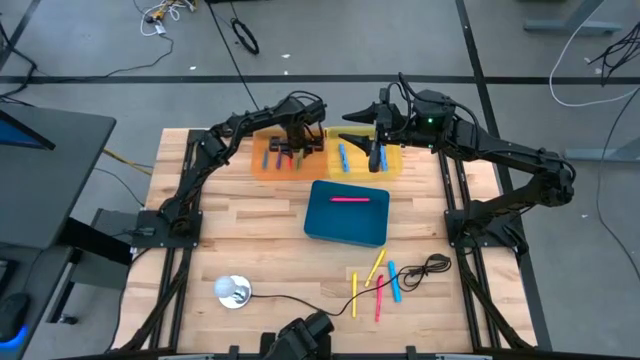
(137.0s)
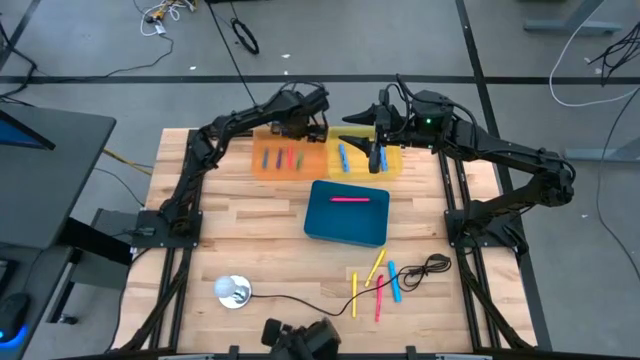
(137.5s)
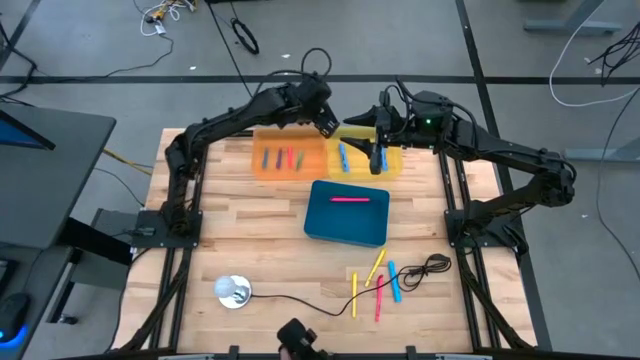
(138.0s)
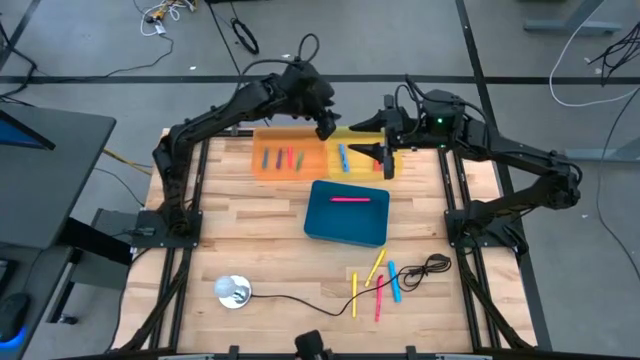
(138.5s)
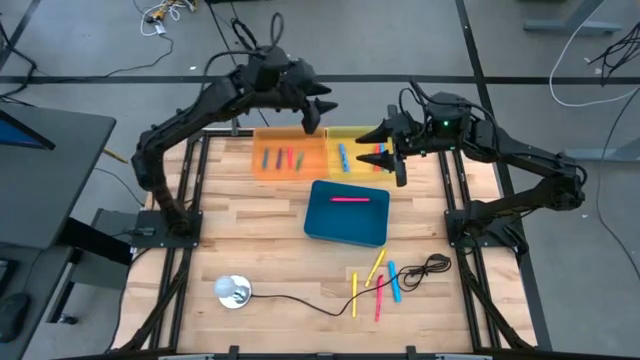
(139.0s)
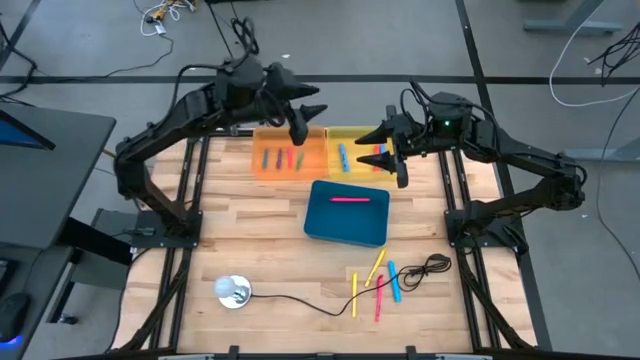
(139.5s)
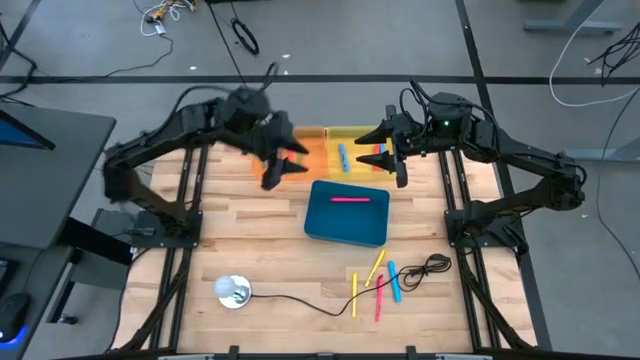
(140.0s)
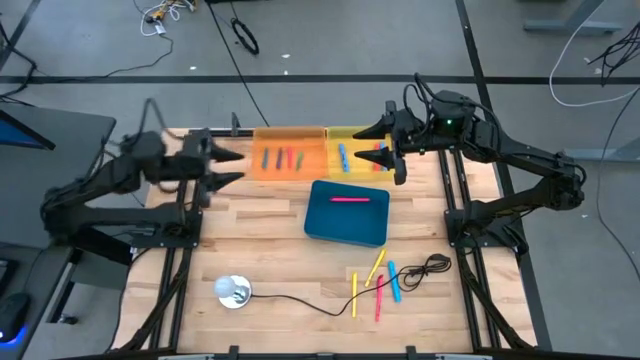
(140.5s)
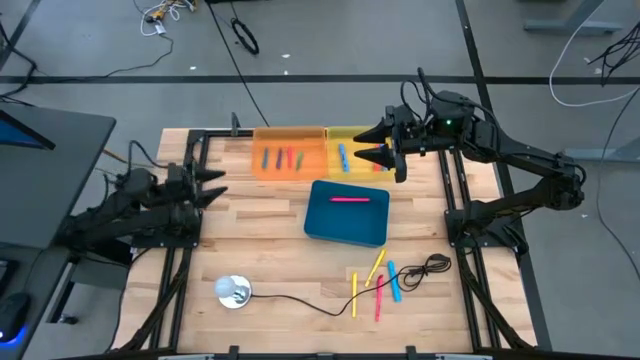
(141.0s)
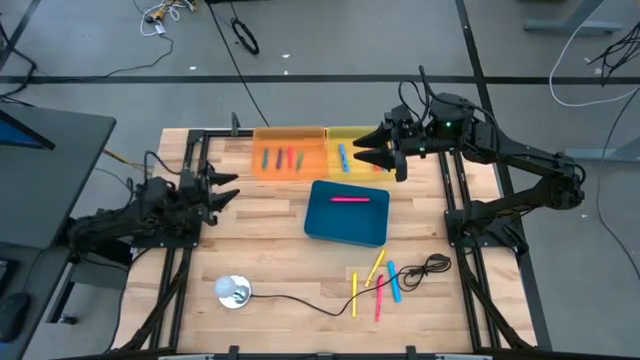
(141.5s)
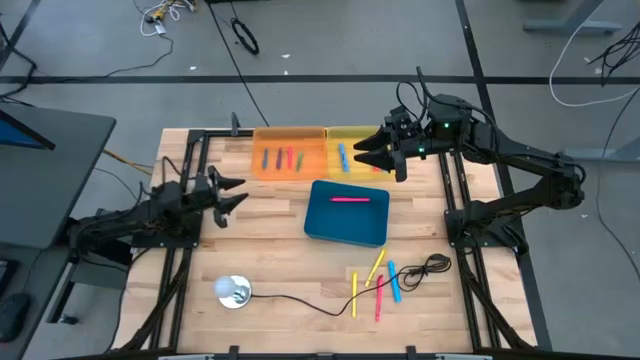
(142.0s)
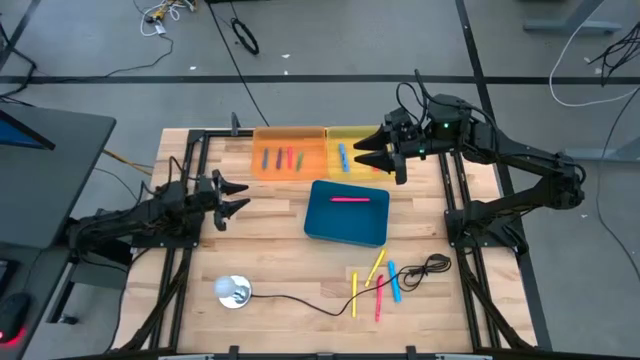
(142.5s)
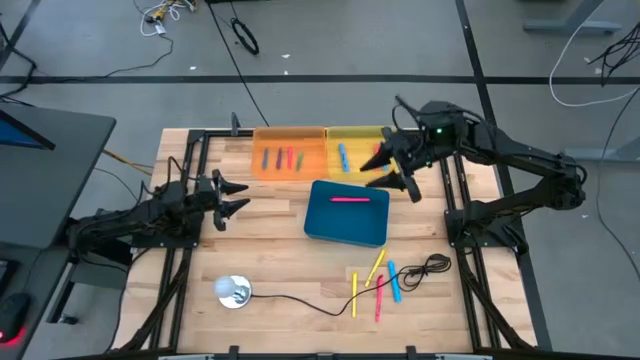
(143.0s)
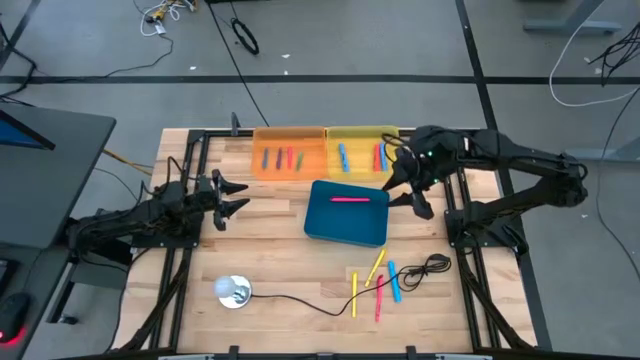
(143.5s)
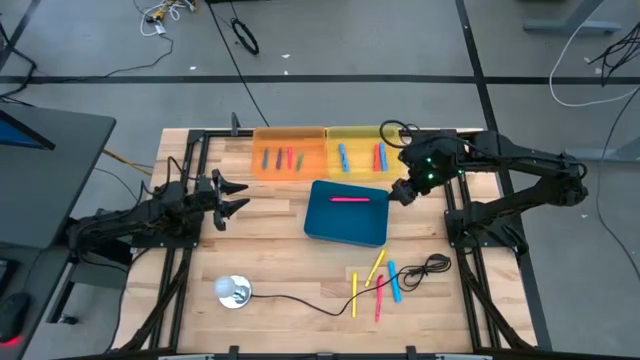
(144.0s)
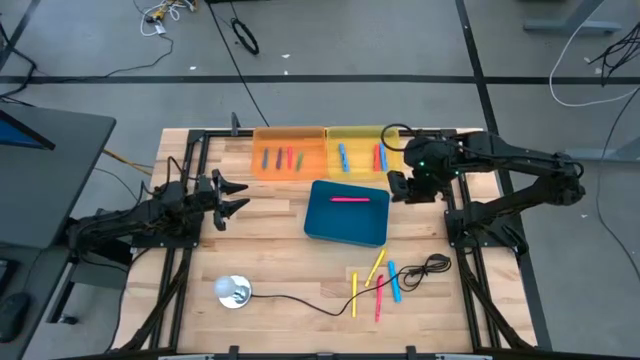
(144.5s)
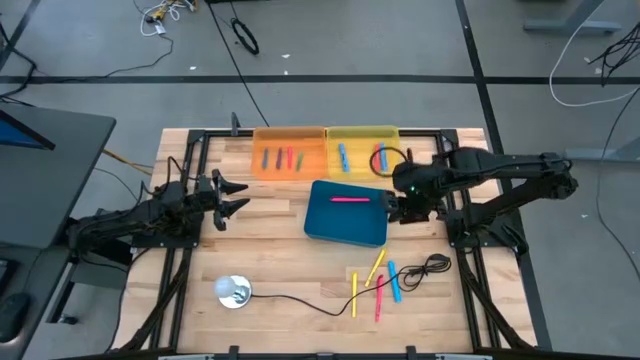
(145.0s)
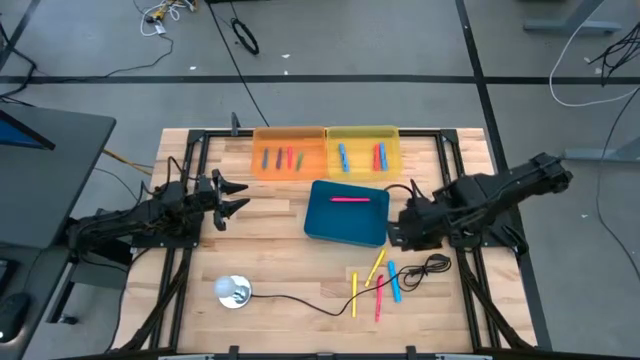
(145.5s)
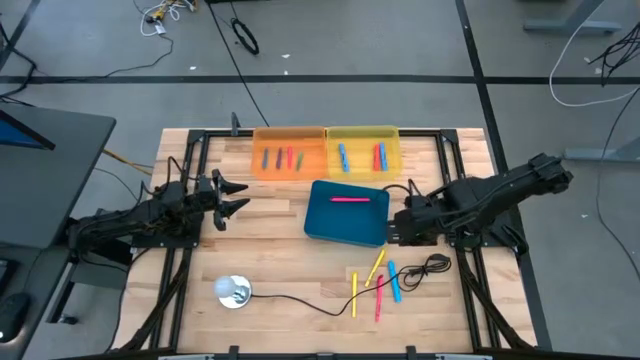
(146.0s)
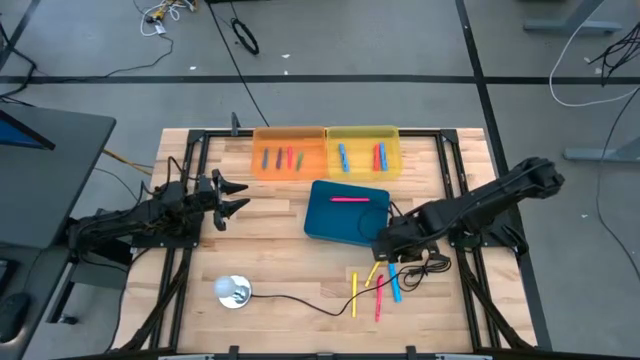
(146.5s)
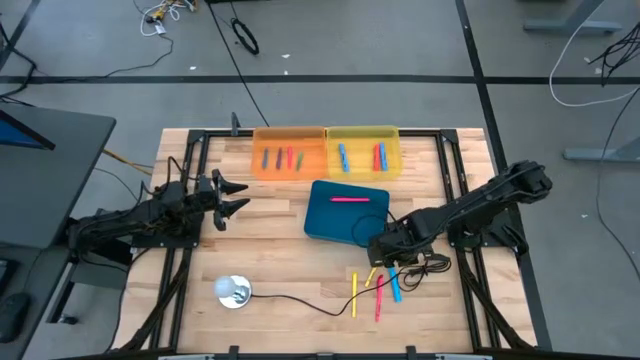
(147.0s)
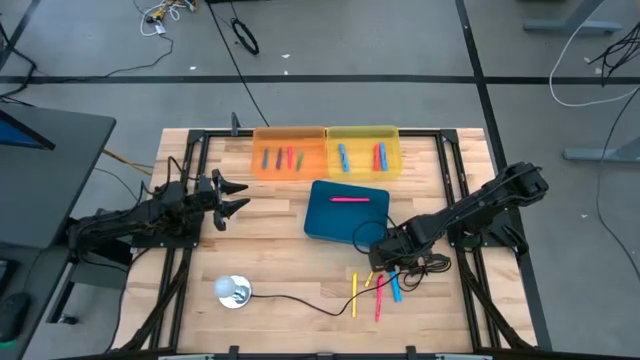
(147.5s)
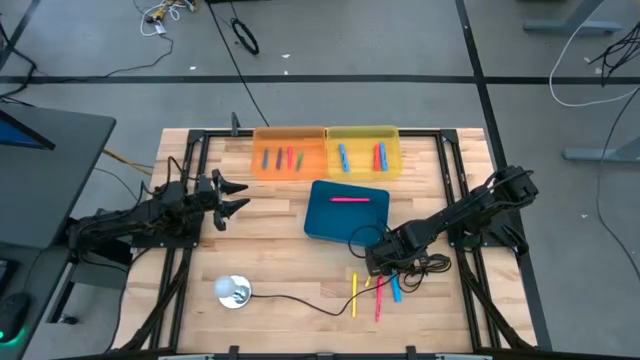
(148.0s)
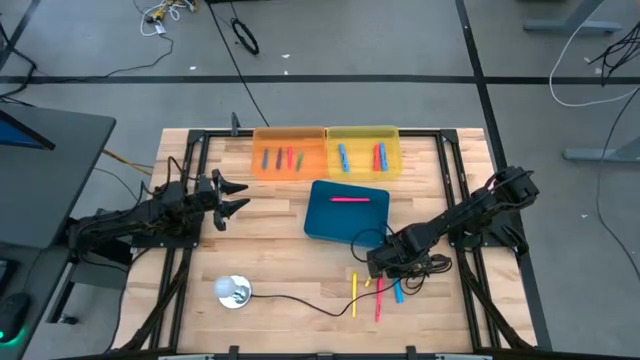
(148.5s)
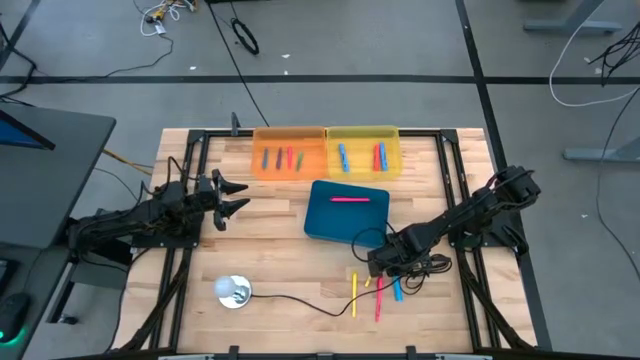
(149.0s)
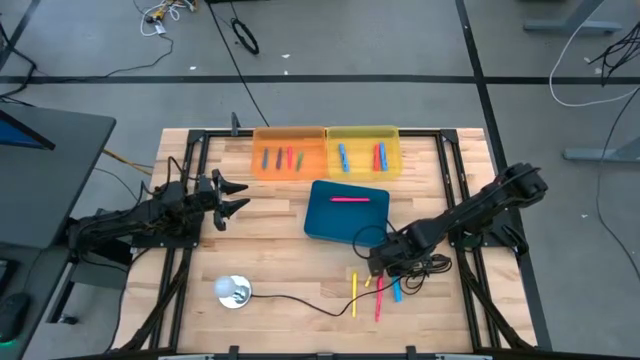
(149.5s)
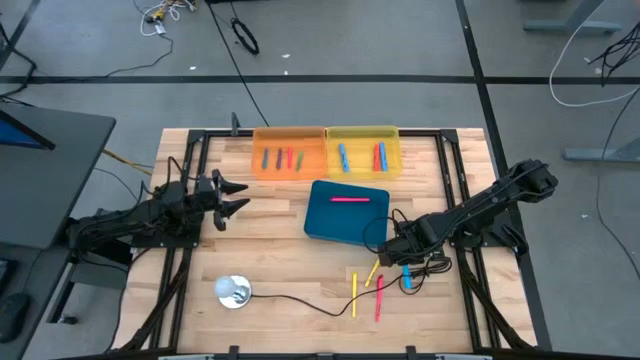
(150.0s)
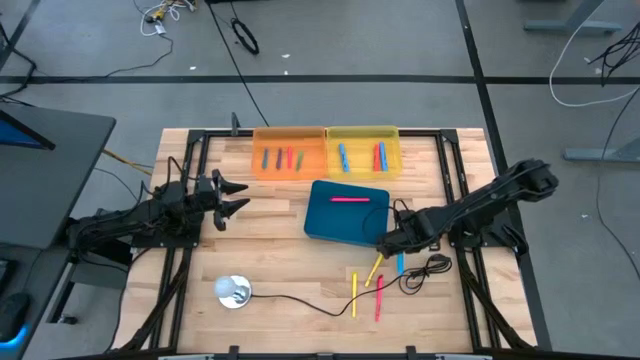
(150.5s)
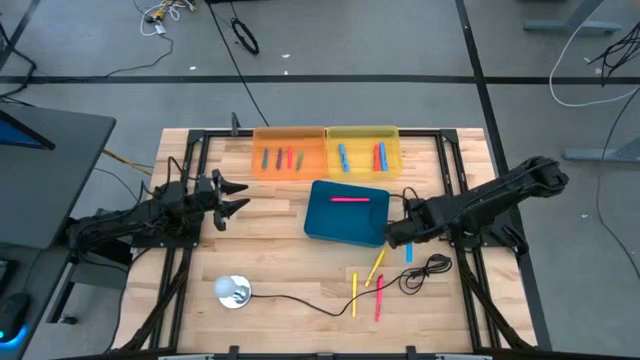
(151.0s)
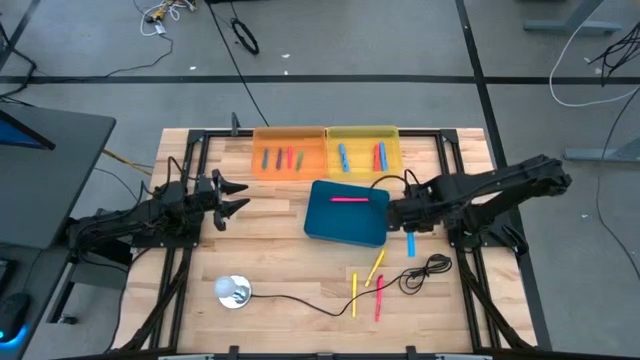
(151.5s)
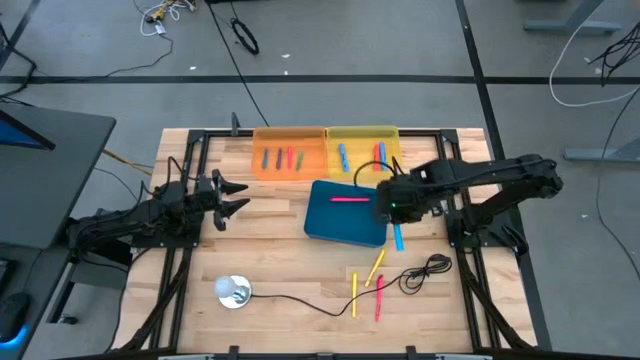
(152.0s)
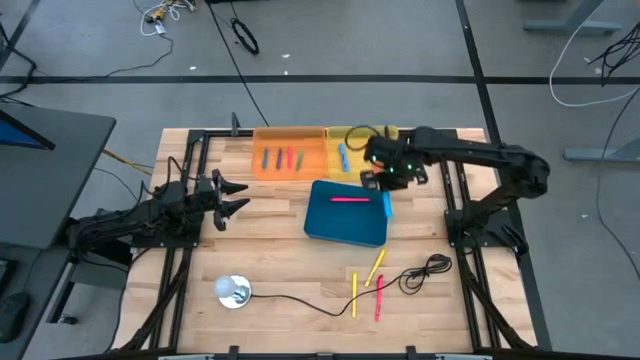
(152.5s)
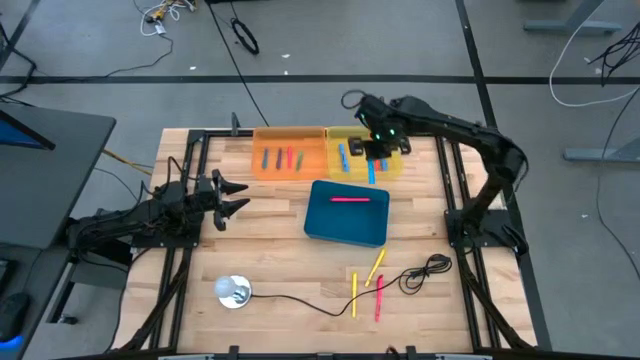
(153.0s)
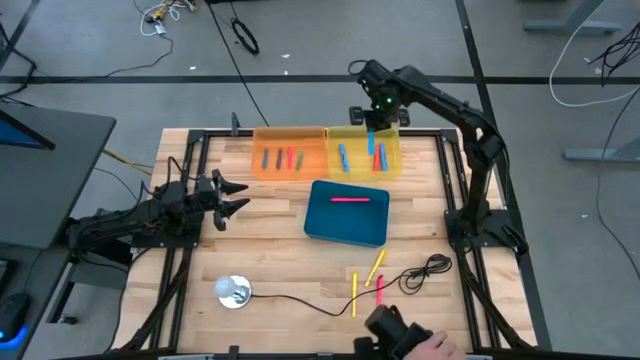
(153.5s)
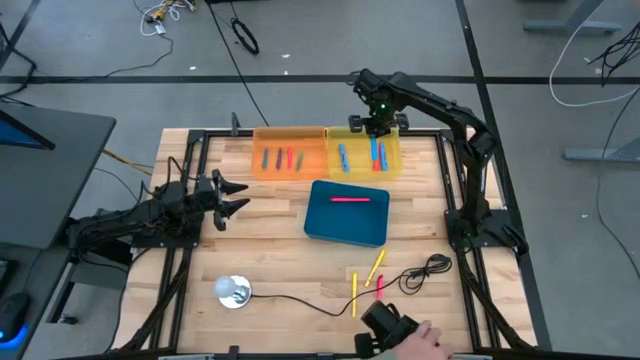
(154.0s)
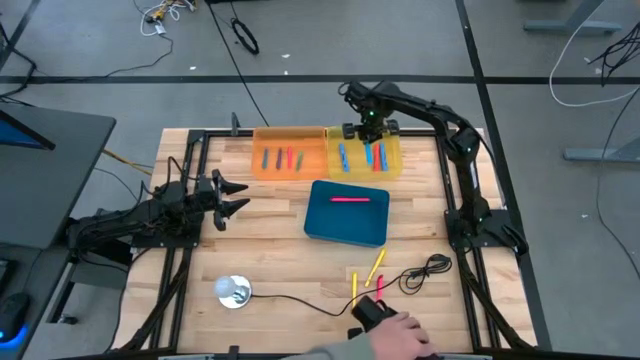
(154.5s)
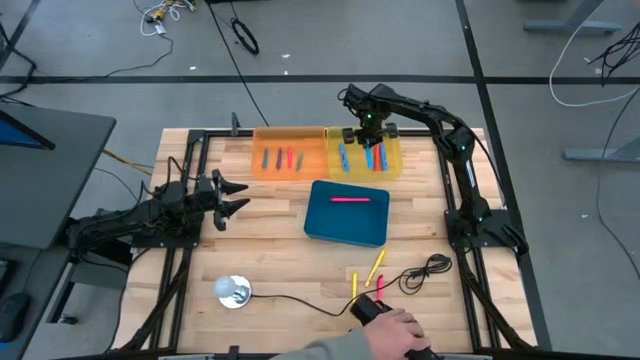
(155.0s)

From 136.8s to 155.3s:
Task: Pick & Place Markers
Put the blue marker into the yellow transparent bin

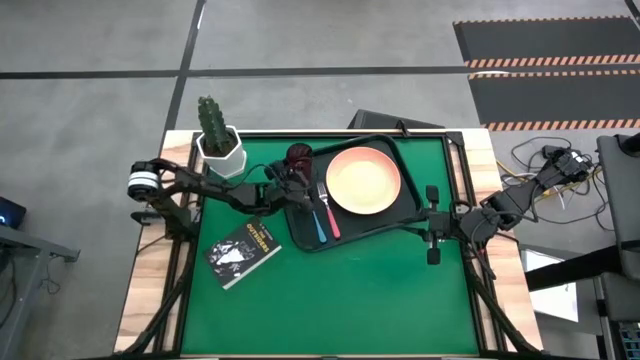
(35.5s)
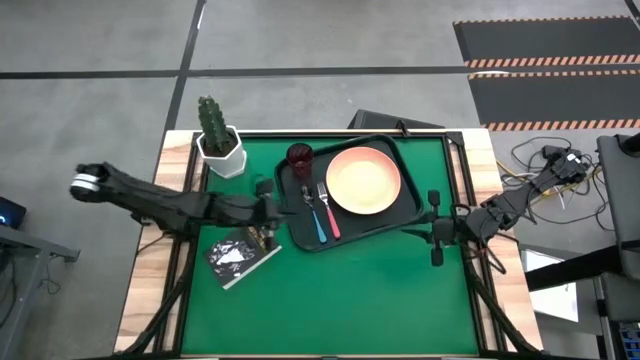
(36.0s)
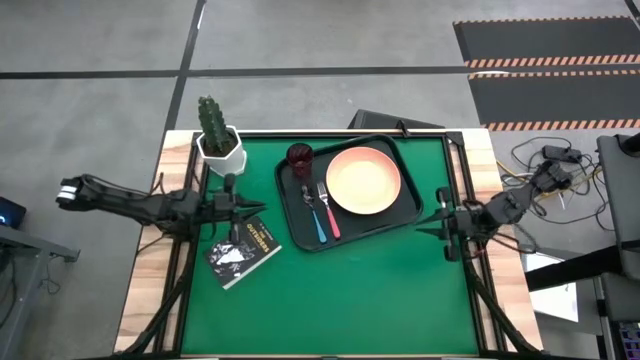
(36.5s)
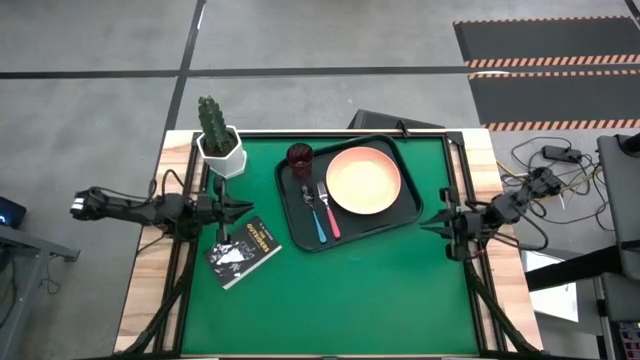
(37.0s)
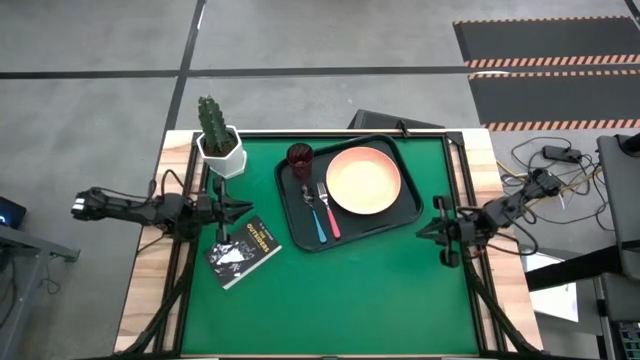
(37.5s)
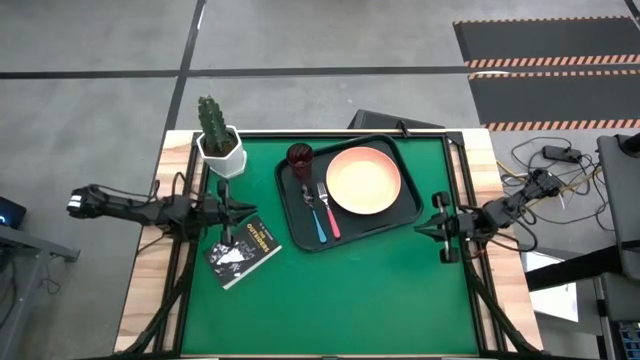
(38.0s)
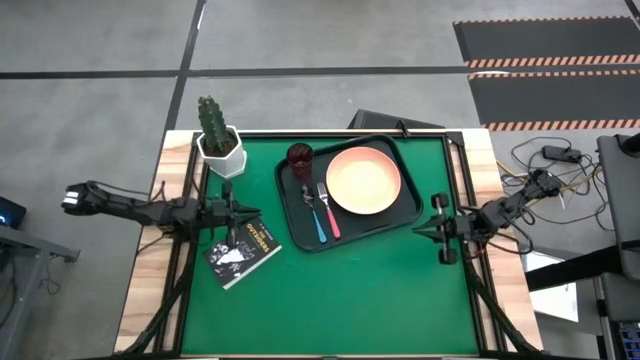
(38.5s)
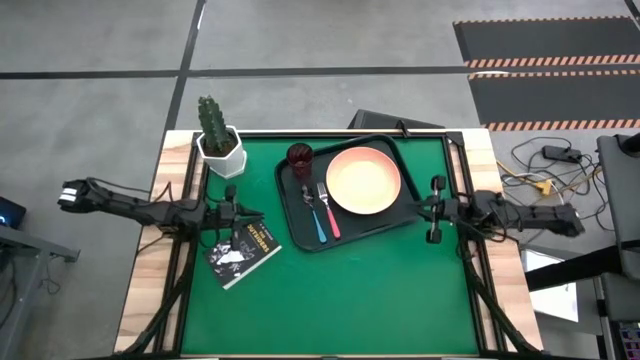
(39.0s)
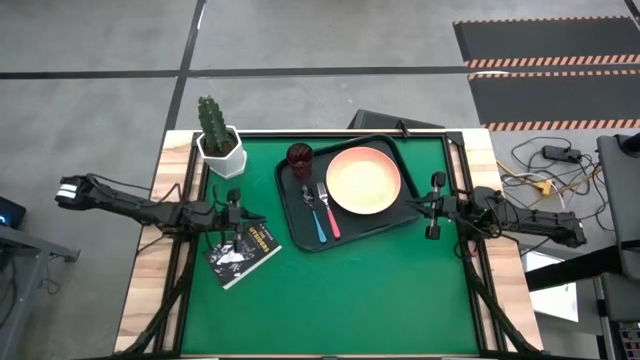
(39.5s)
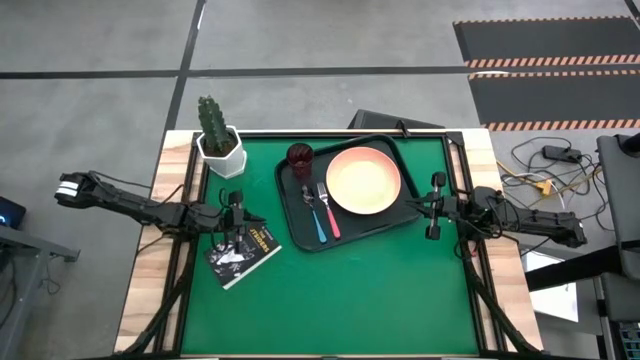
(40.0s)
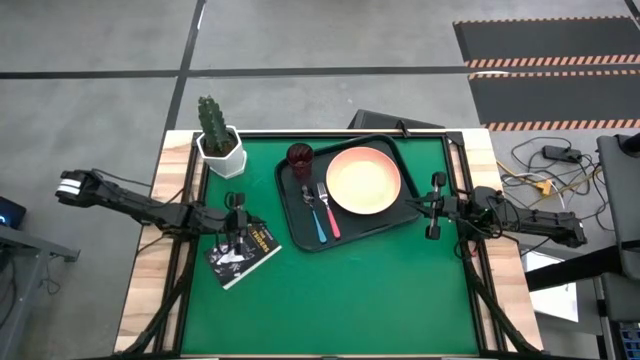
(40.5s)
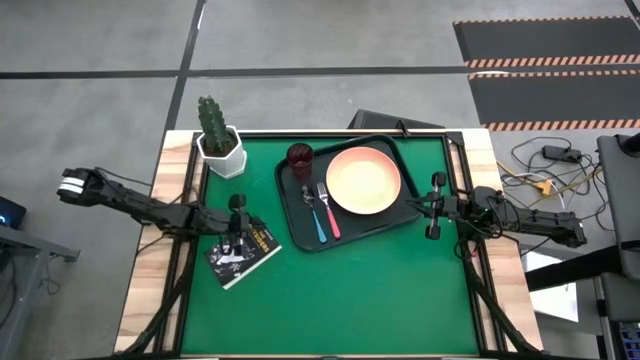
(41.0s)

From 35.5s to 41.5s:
Task: Pick and place plate/cup/fork/spoon on tray
Return to Home Position
